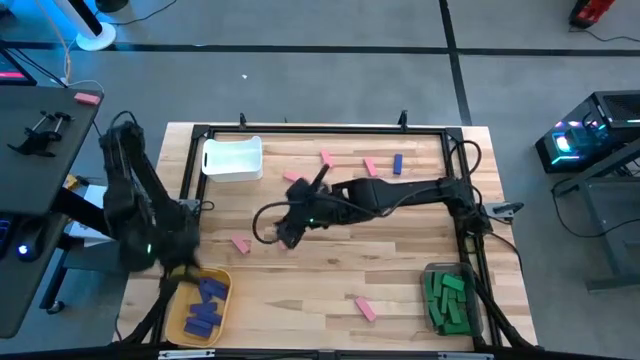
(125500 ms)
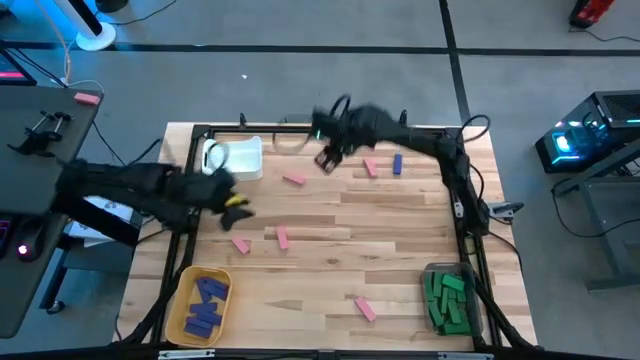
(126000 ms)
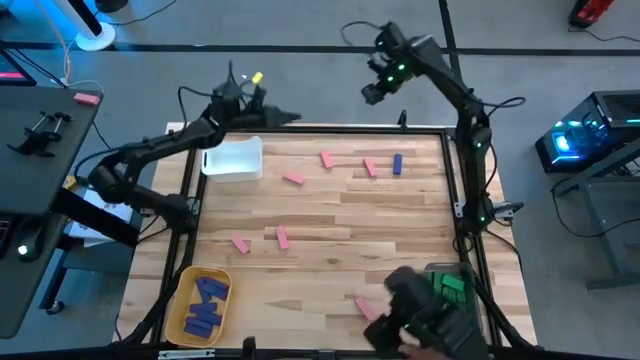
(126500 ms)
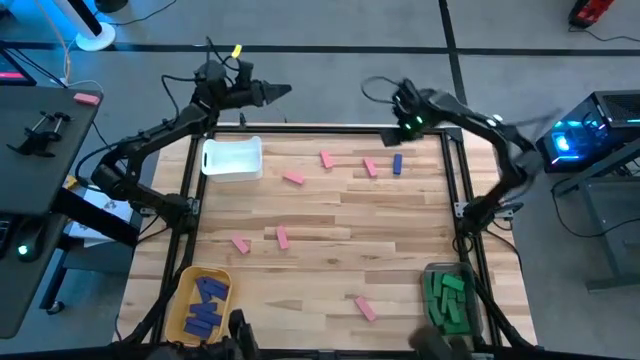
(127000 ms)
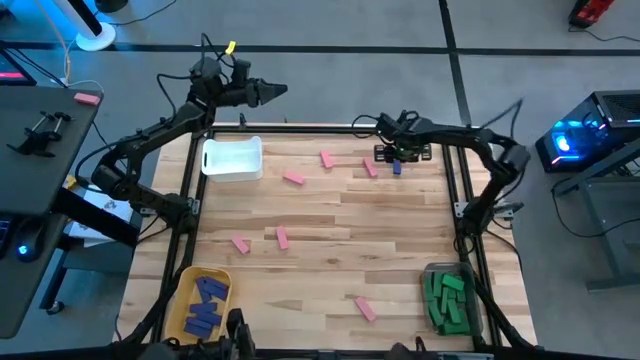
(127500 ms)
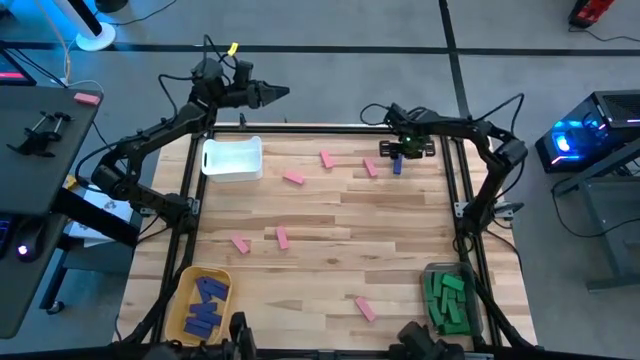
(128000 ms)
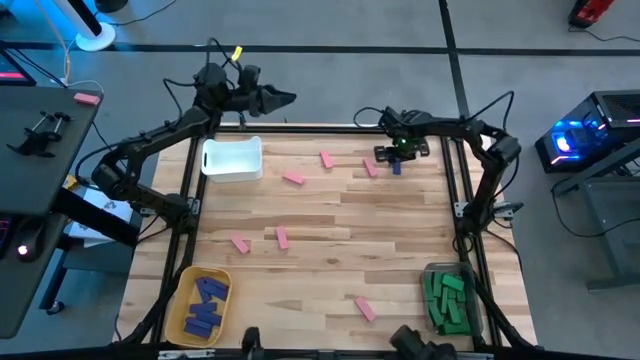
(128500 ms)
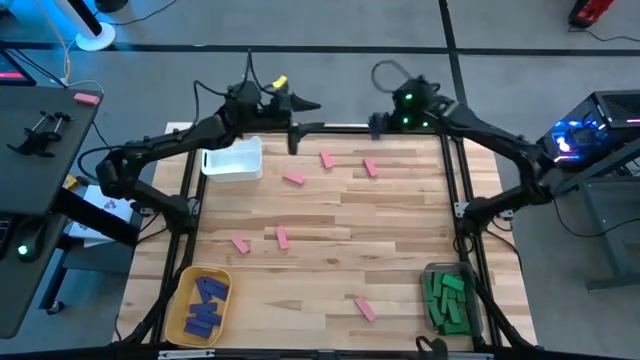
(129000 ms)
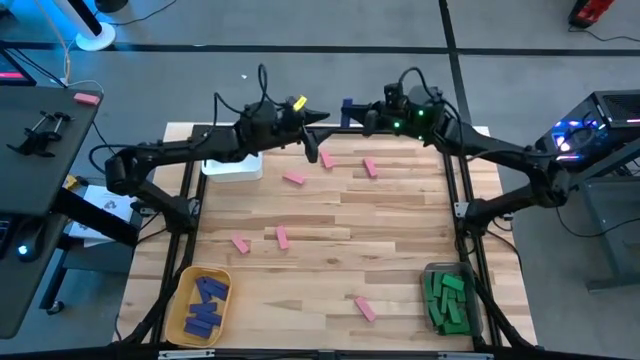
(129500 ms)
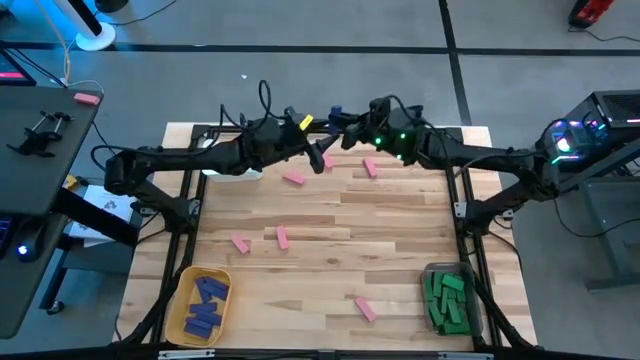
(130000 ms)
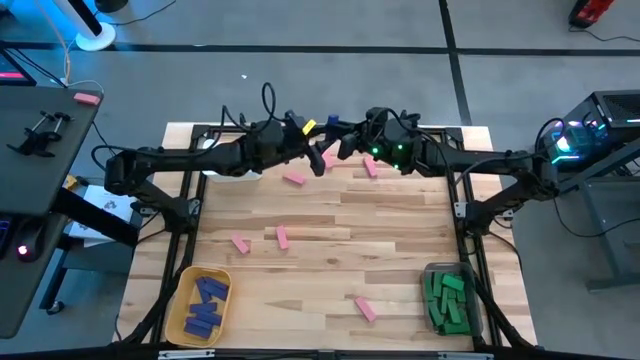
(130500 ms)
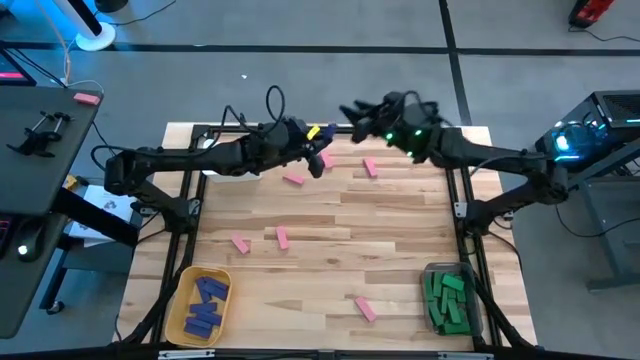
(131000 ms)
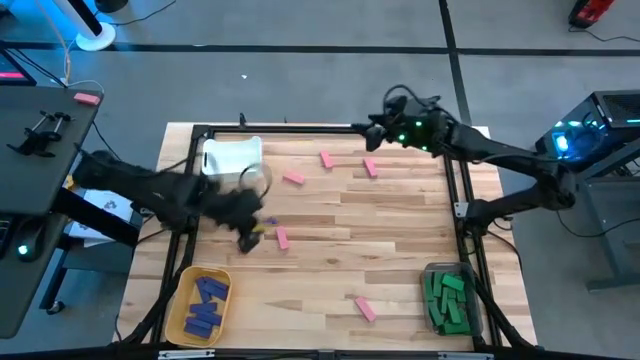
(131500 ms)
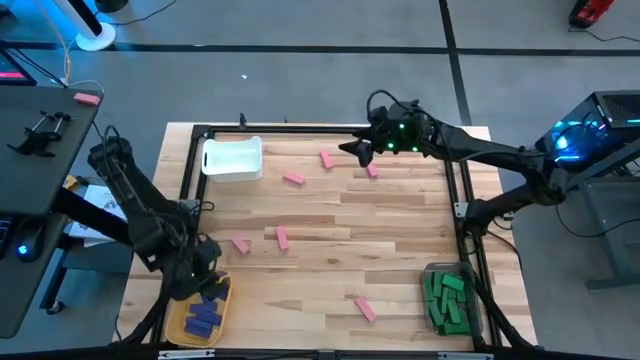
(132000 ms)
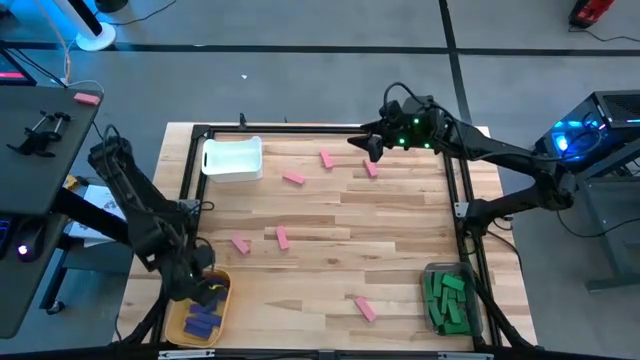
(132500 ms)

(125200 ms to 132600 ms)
Task: Sort blocks
Put the purple block into the yellow bin

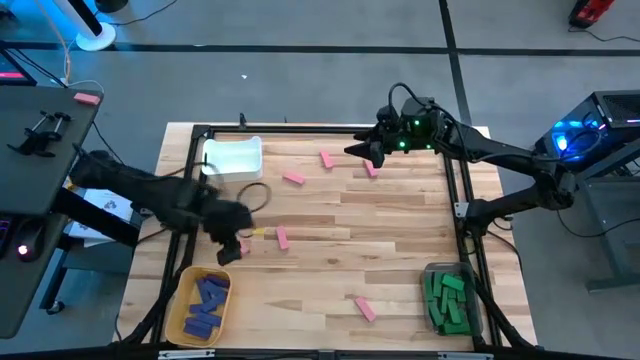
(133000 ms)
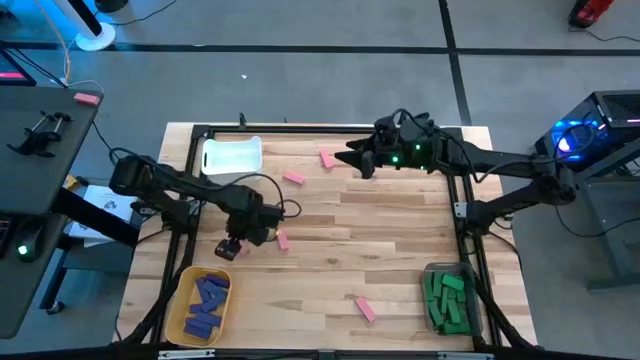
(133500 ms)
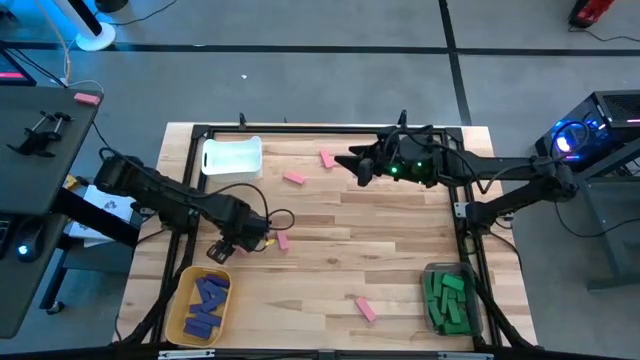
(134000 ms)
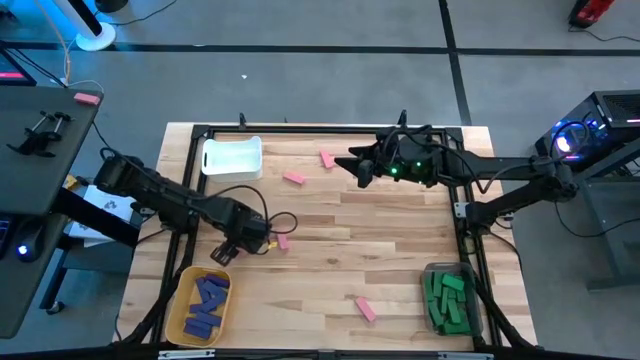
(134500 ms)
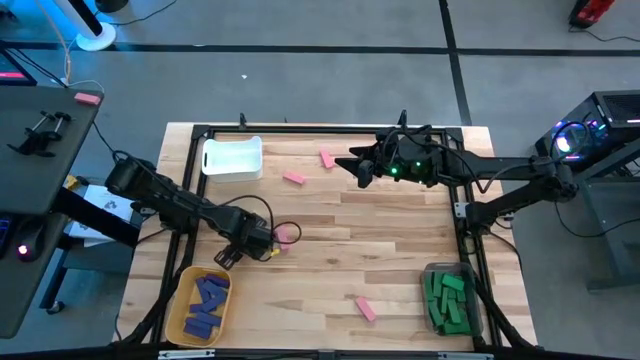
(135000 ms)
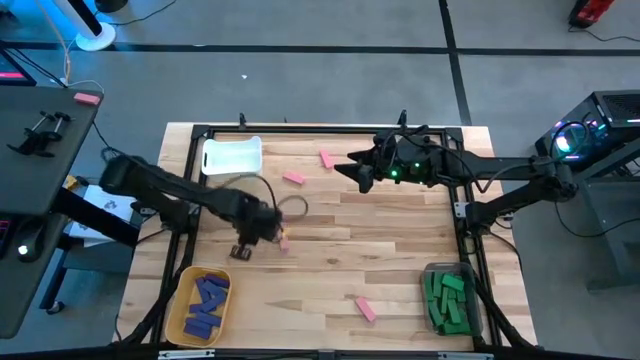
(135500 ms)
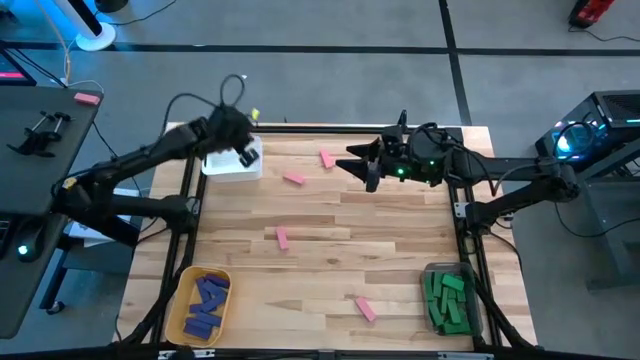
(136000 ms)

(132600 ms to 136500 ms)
Put the pink block into the white bin

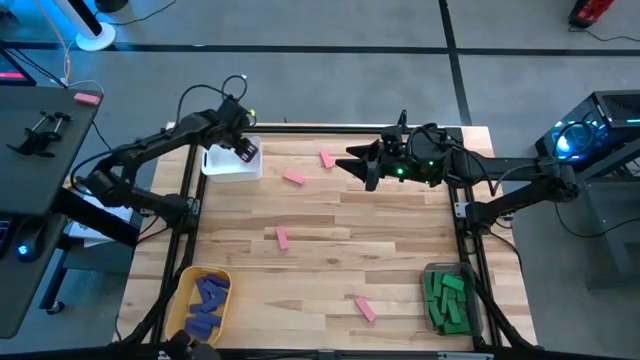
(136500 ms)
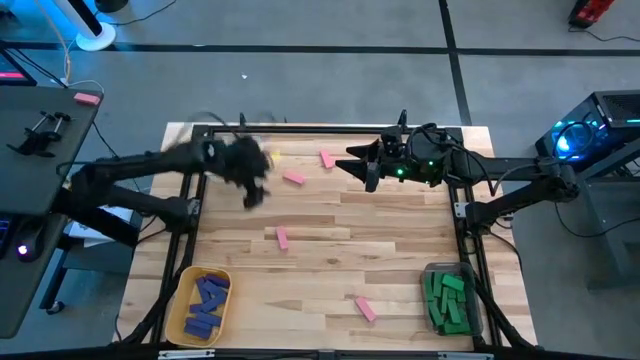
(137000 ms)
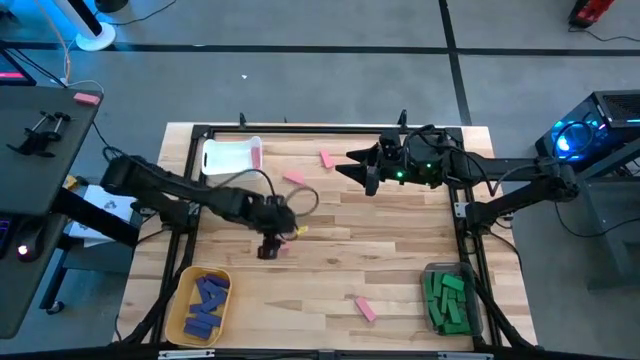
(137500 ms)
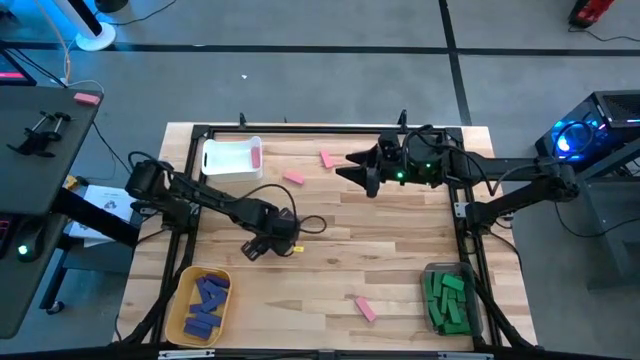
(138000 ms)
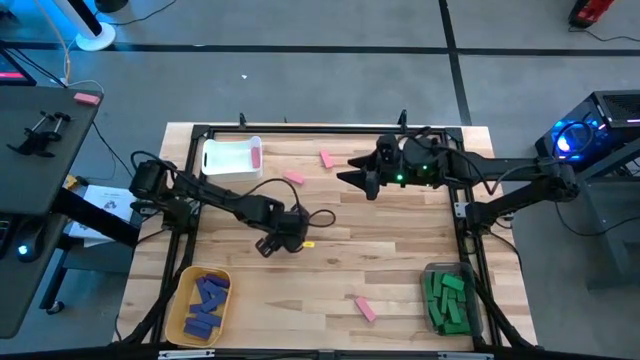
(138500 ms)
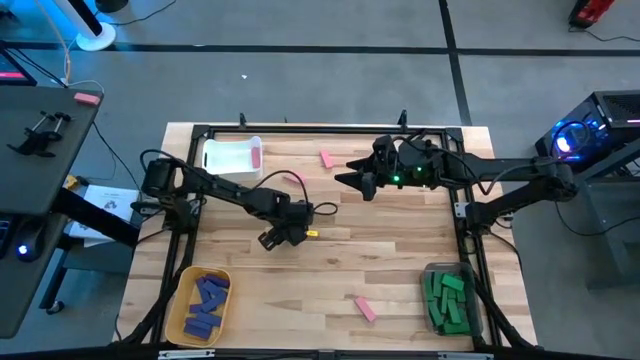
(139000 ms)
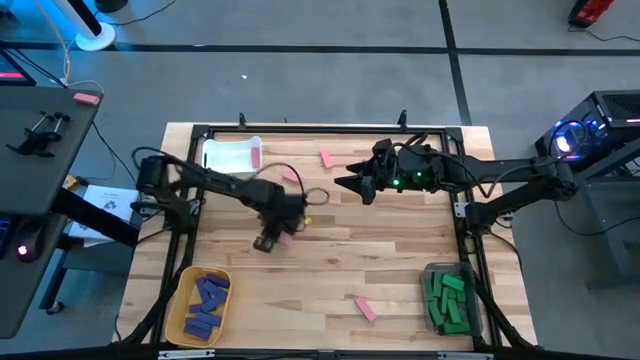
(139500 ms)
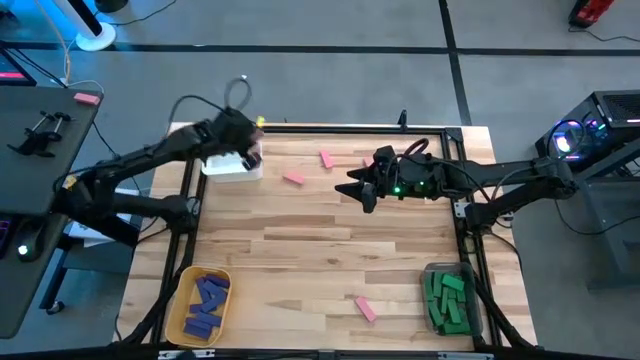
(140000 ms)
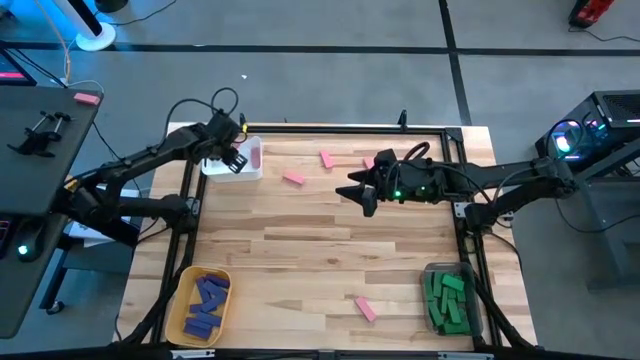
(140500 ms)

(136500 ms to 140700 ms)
Put the pink block into the white bin

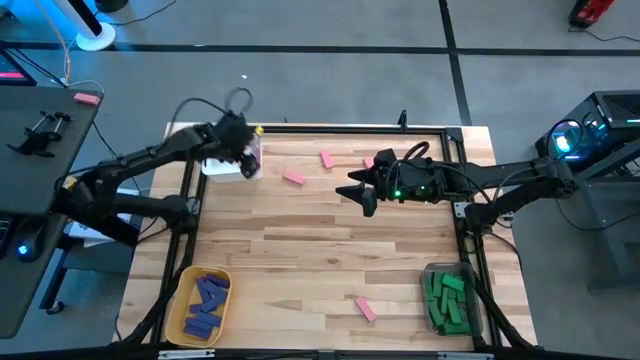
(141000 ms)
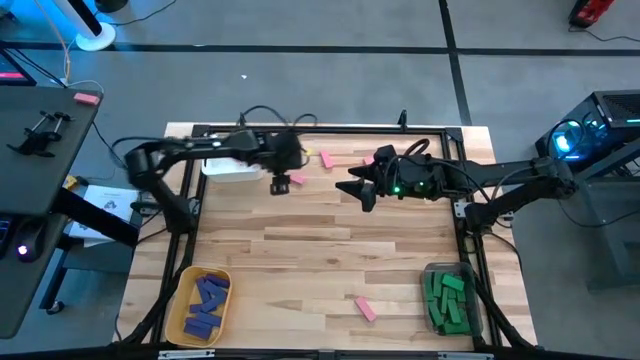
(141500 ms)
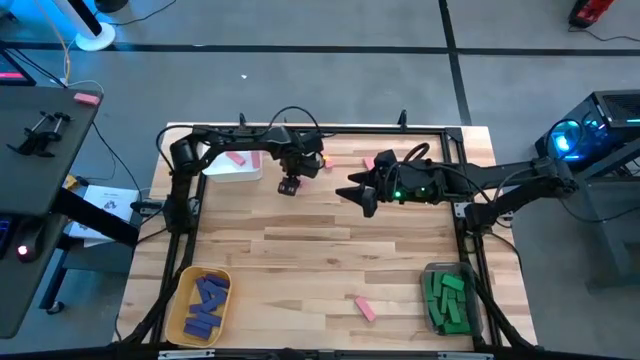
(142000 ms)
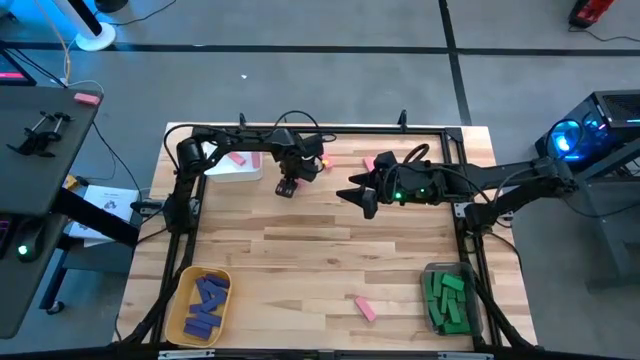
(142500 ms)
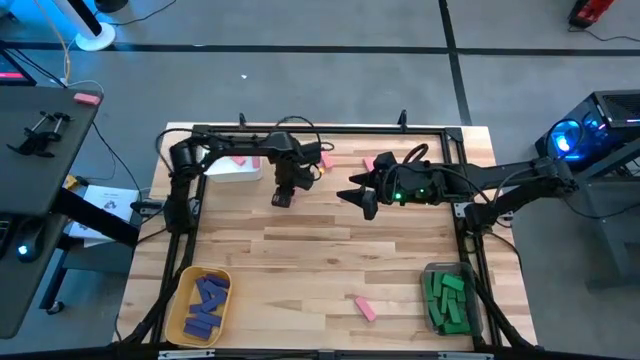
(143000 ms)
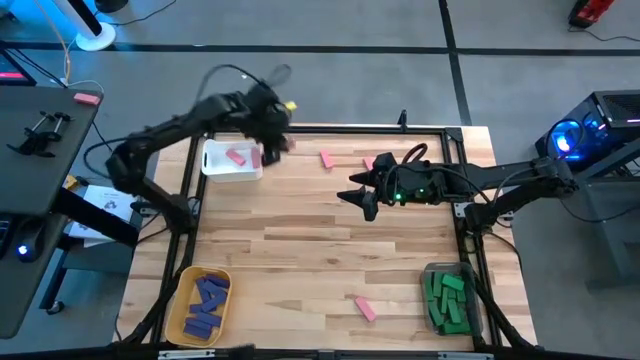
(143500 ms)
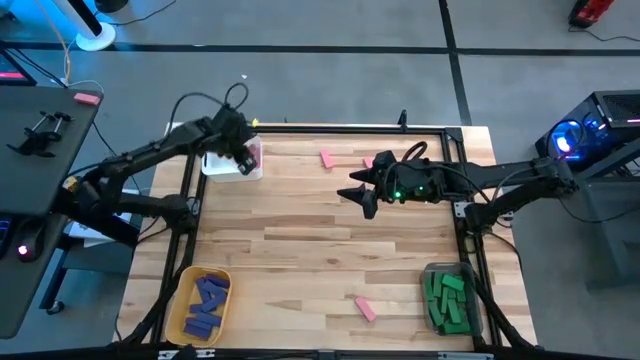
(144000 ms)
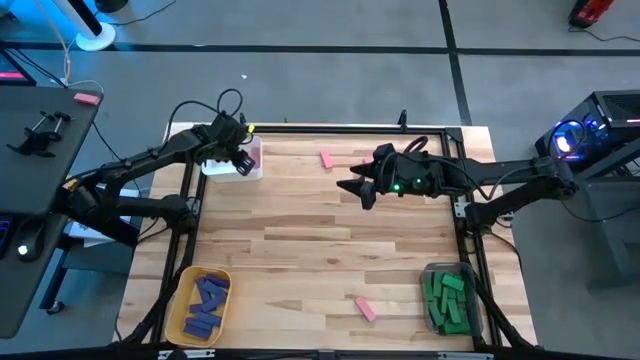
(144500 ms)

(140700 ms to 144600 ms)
Put the pink block into the white bin

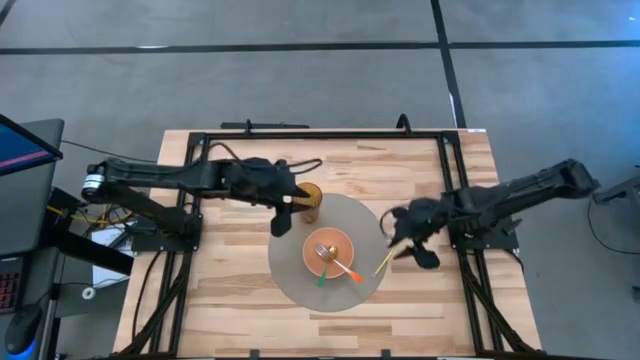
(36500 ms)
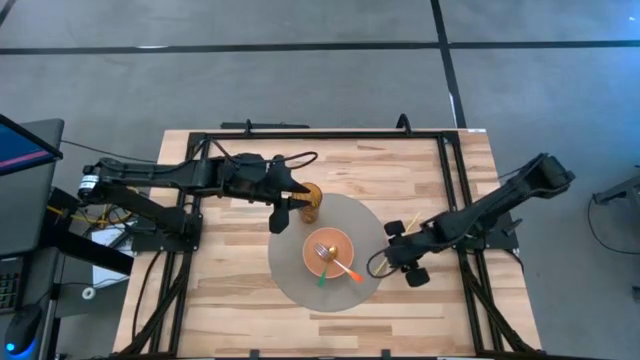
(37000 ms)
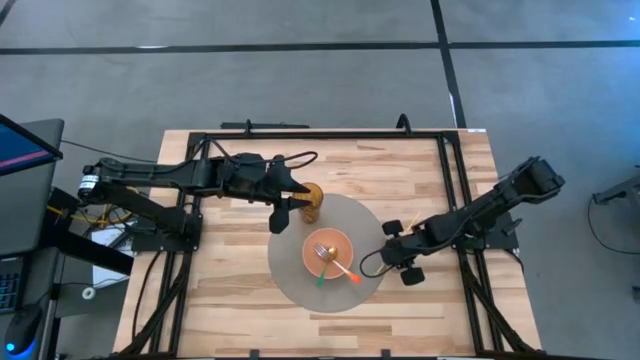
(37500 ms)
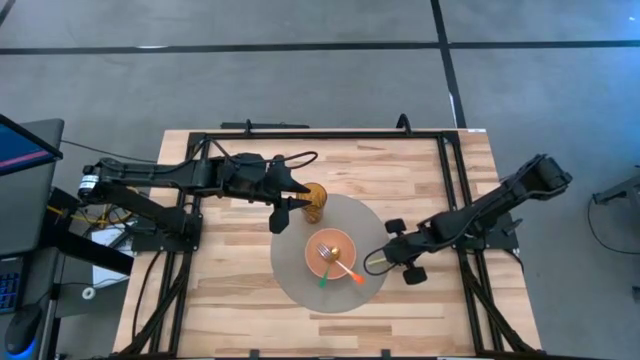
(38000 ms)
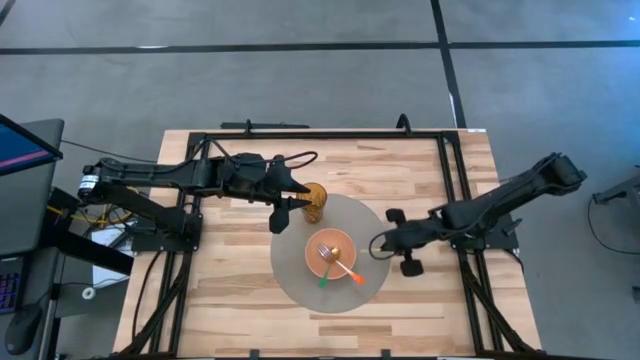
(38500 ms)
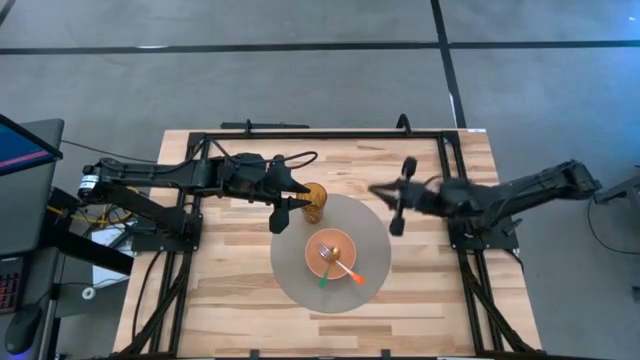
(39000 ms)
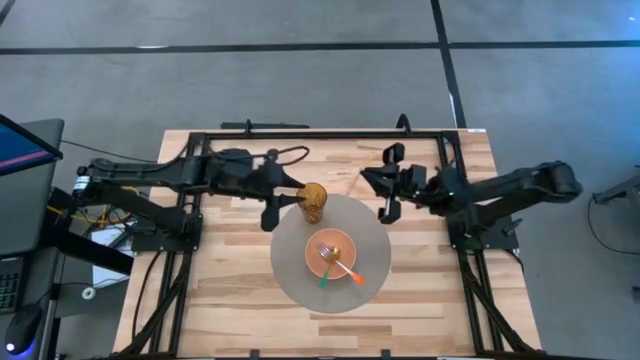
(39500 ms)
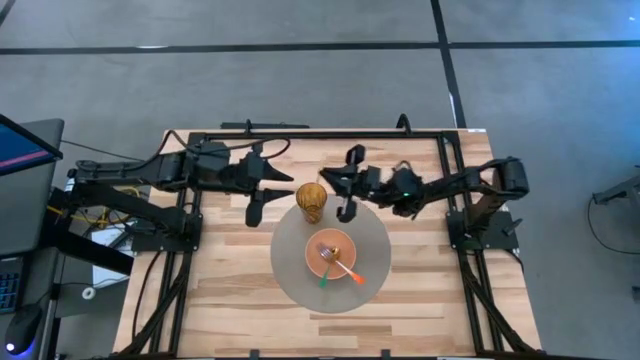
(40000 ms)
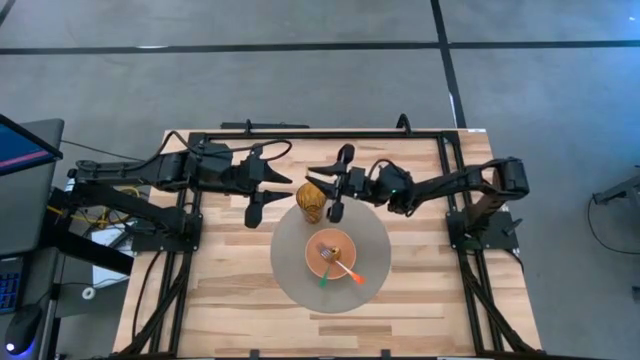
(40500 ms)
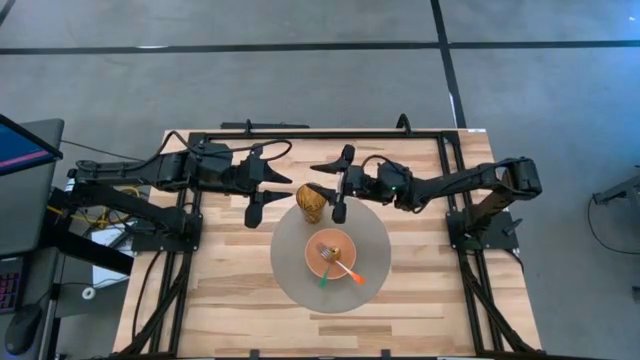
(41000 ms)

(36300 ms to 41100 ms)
Task: Pick & Place Utensil
Put the yellow straw into the yellow cup
